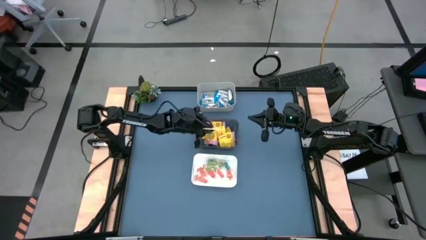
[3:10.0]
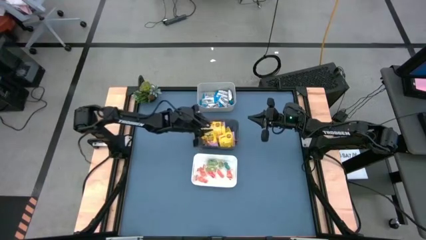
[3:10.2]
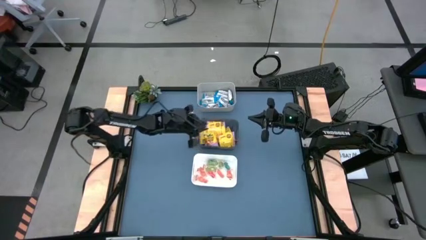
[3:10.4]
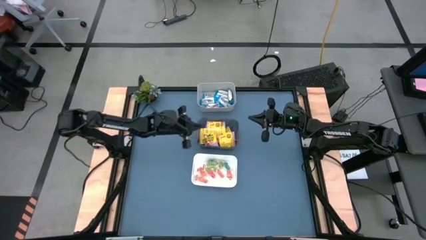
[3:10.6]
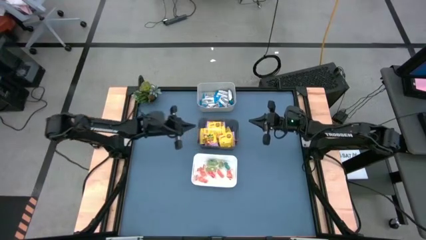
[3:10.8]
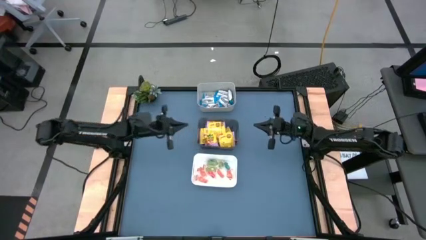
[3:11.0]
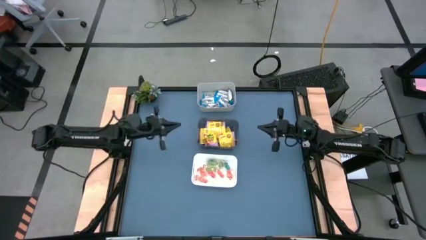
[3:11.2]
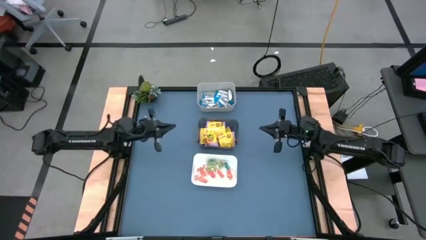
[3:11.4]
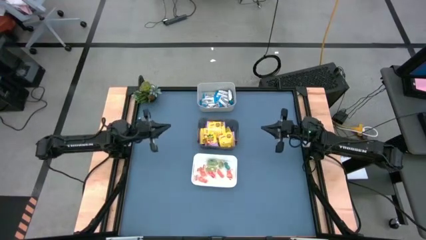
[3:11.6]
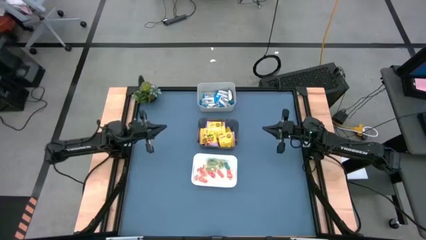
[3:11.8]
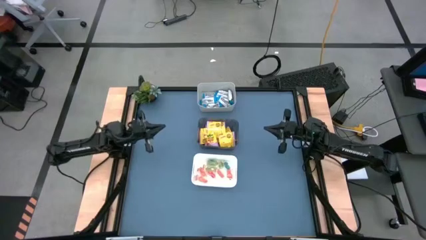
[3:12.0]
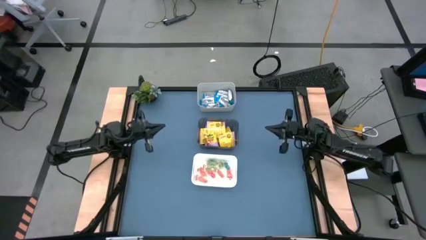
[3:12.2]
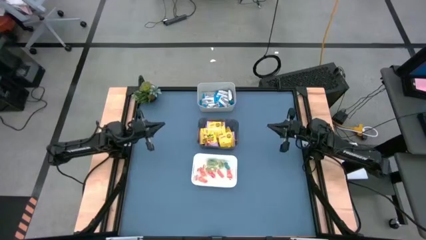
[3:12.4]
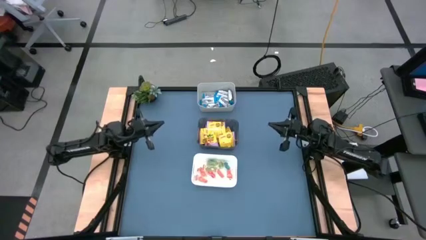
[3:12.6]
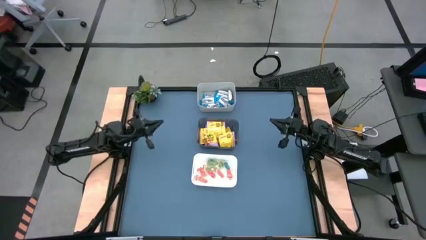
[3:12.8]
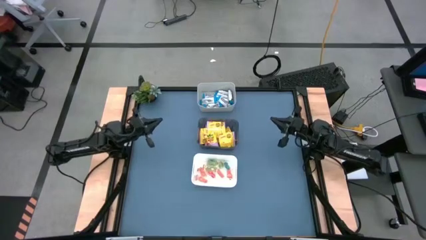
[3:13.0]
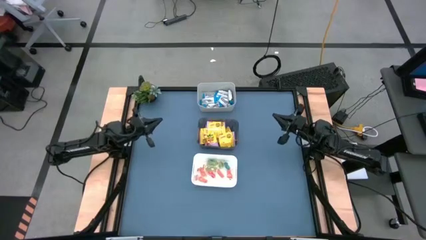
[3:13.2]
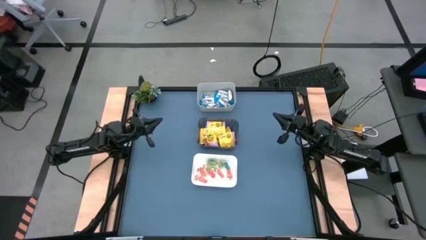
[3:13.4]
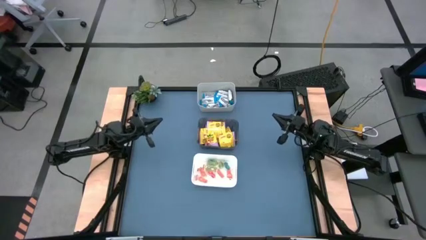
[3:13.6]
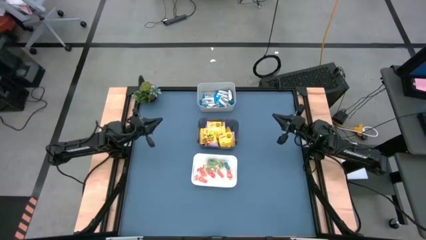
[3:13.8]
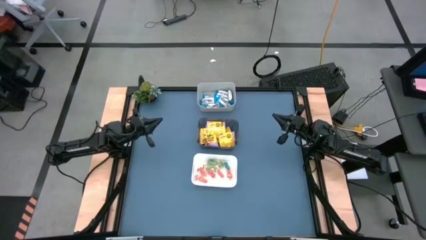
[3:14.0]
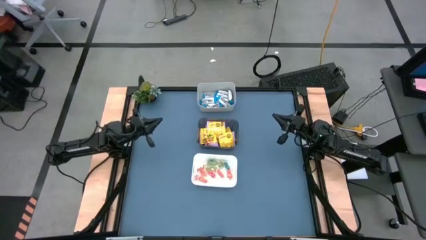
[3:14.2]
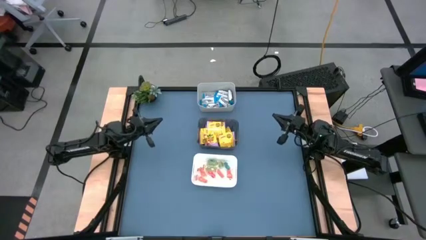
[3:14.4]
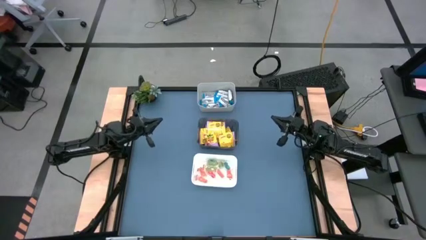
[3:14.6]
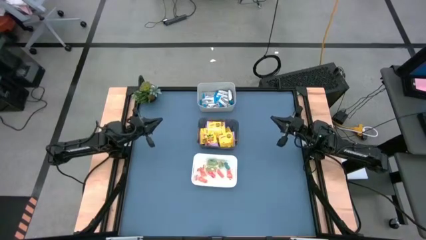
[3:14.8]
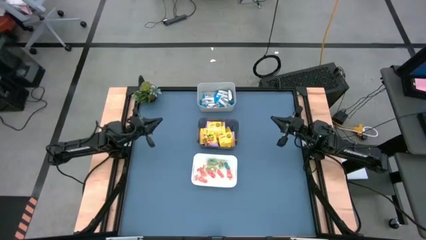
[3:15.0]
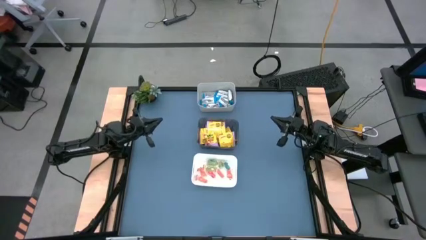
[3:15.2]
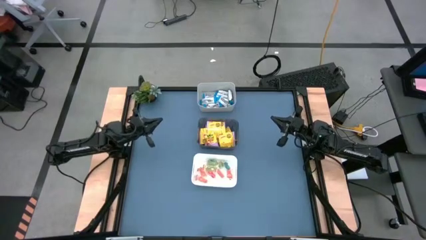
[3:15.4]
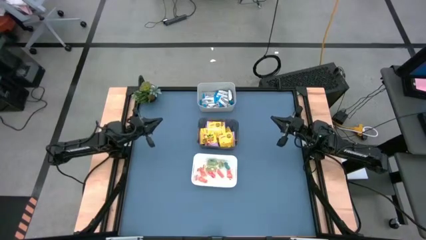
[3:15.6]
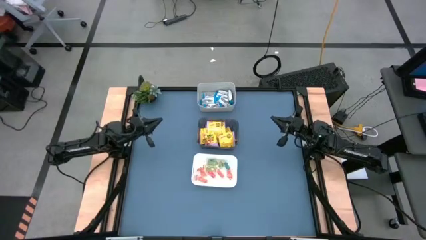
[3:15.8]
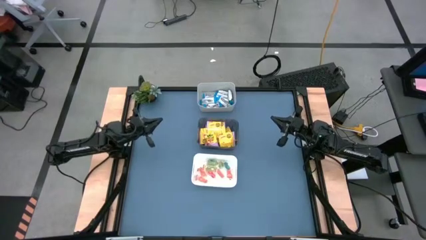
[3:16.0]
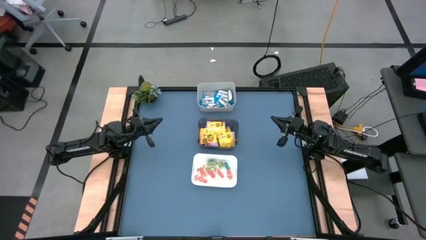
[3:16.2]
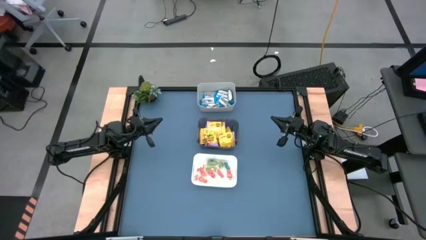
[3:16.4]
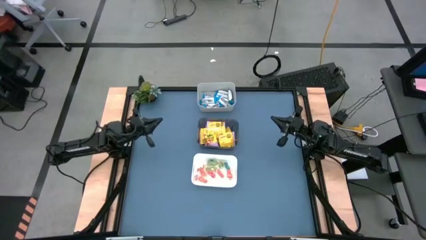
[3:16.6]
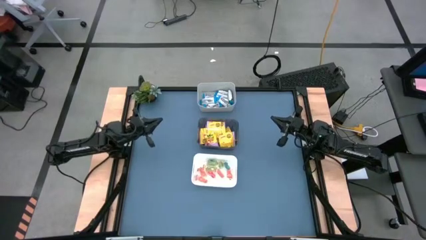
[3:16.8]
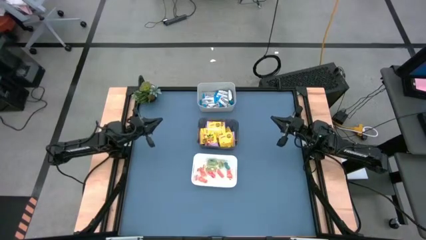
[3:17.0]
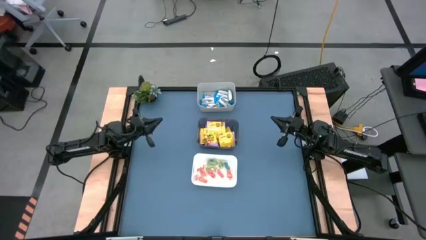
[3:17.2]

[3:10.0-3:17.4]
Task: Sort candy
Return to Home Position

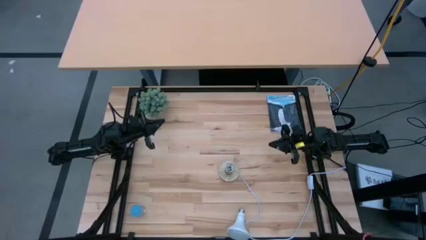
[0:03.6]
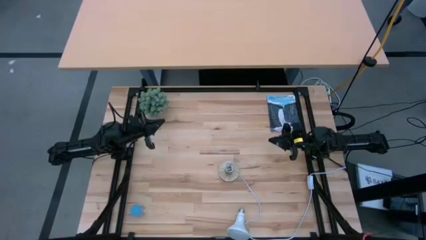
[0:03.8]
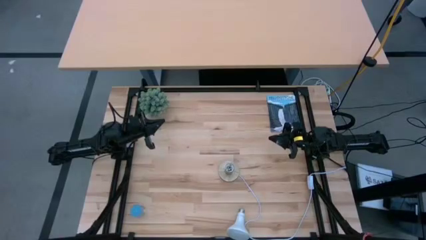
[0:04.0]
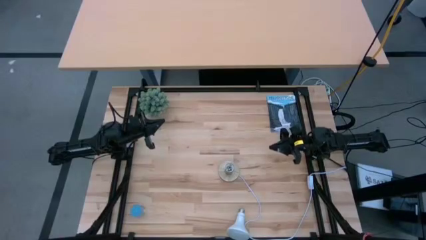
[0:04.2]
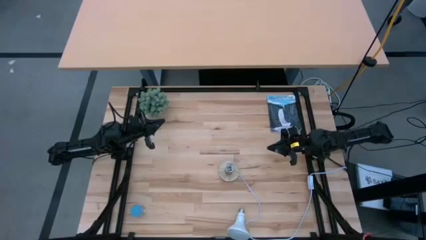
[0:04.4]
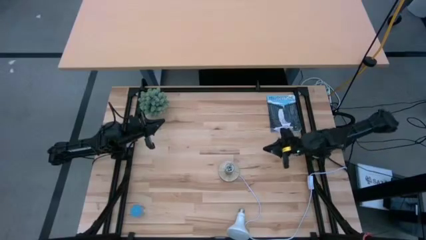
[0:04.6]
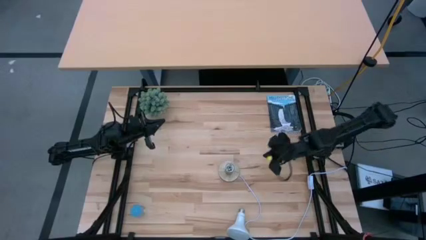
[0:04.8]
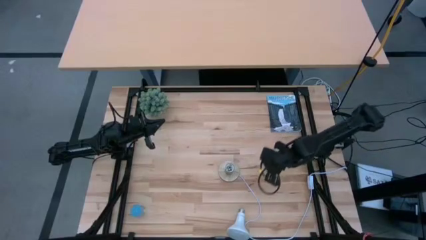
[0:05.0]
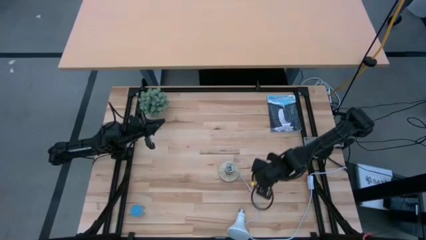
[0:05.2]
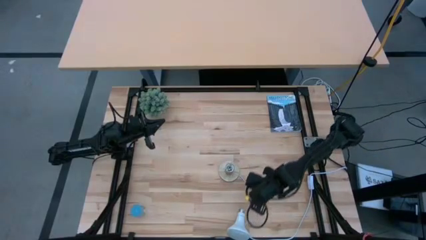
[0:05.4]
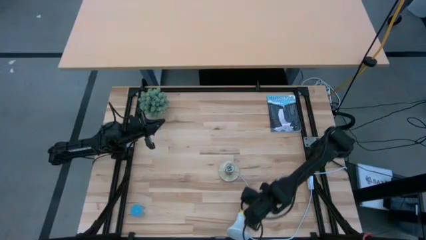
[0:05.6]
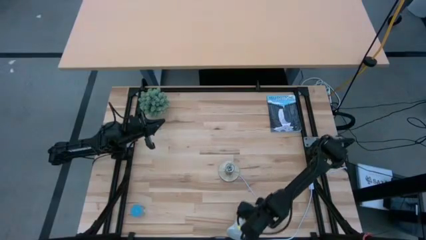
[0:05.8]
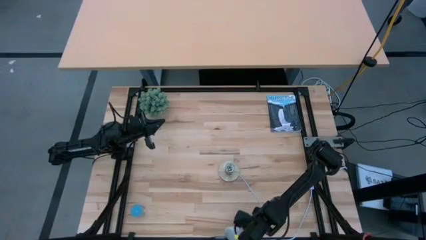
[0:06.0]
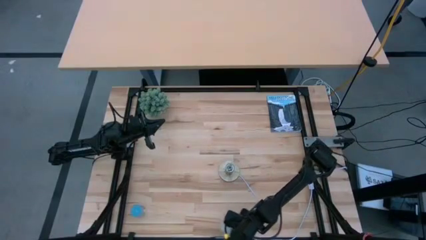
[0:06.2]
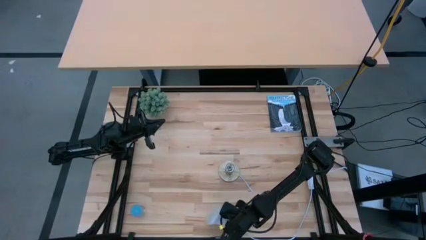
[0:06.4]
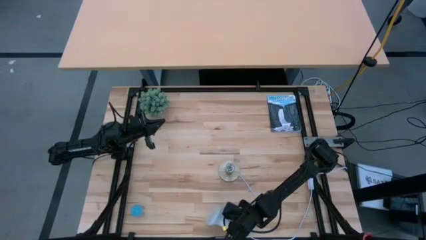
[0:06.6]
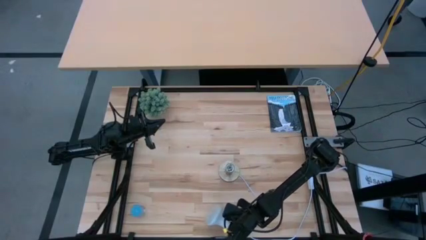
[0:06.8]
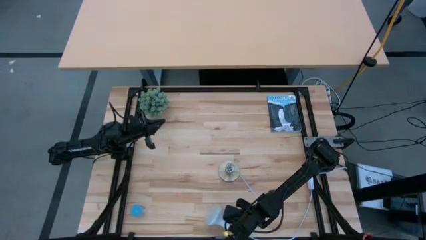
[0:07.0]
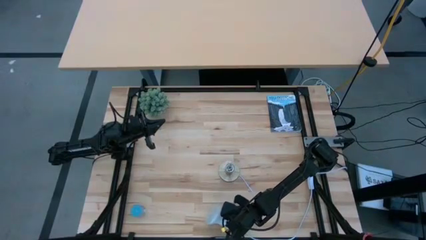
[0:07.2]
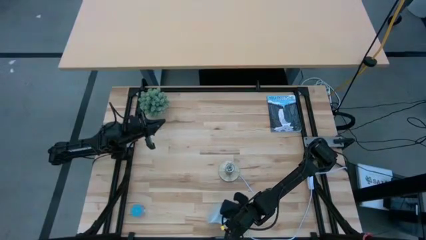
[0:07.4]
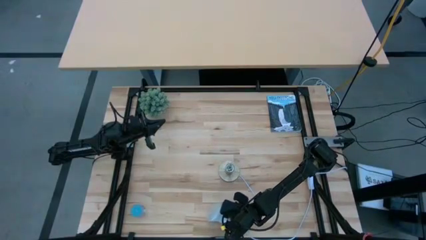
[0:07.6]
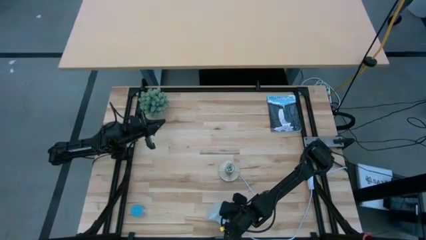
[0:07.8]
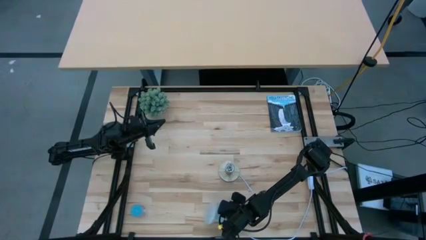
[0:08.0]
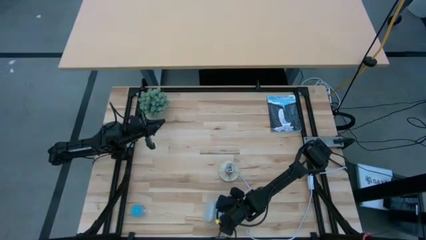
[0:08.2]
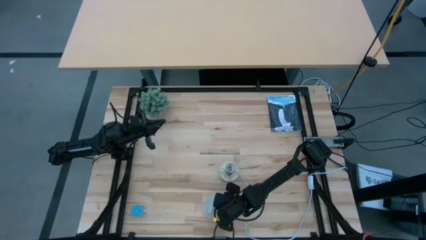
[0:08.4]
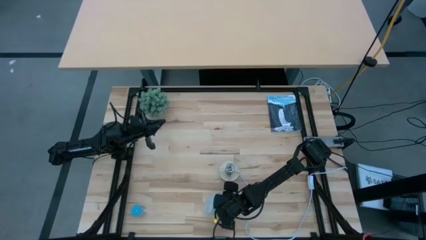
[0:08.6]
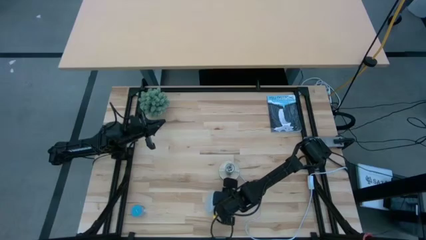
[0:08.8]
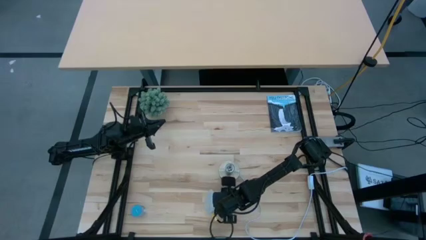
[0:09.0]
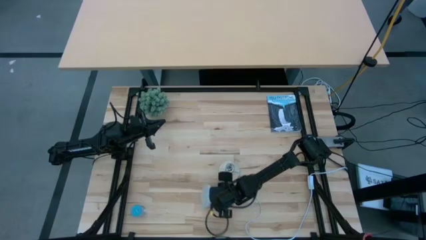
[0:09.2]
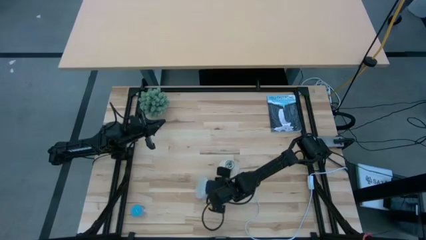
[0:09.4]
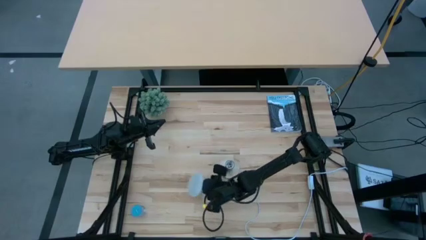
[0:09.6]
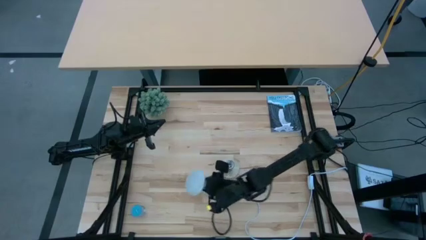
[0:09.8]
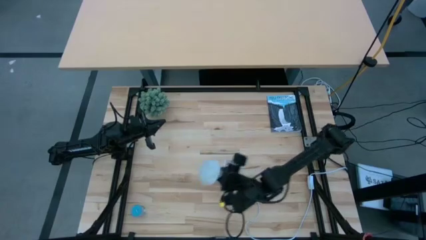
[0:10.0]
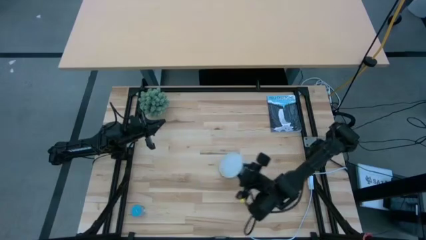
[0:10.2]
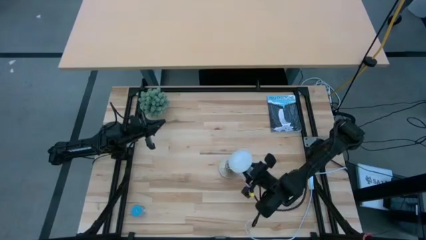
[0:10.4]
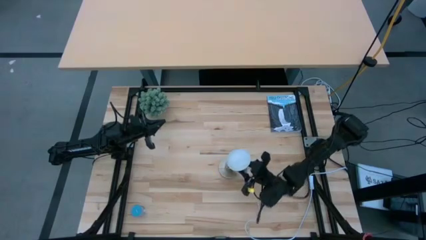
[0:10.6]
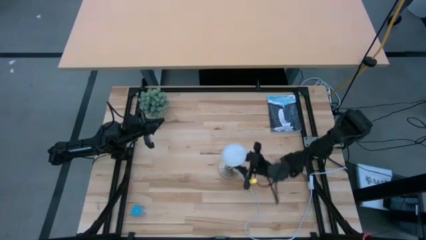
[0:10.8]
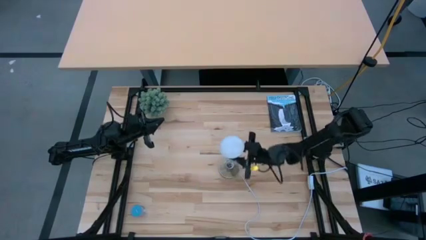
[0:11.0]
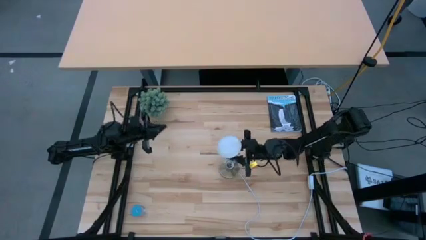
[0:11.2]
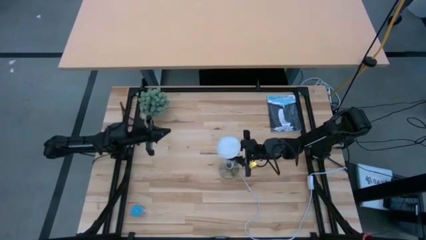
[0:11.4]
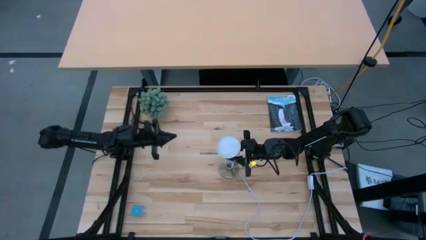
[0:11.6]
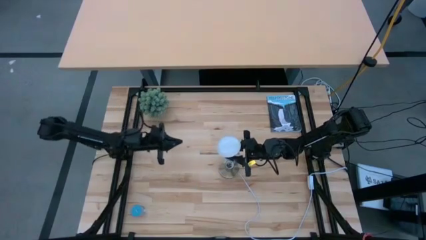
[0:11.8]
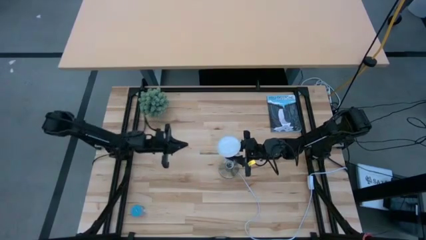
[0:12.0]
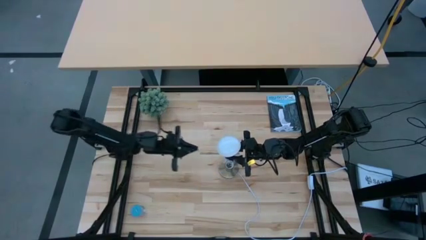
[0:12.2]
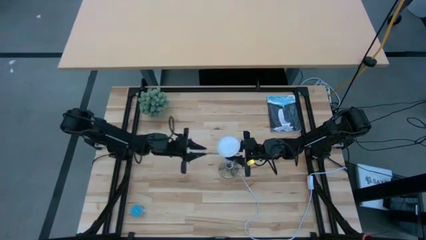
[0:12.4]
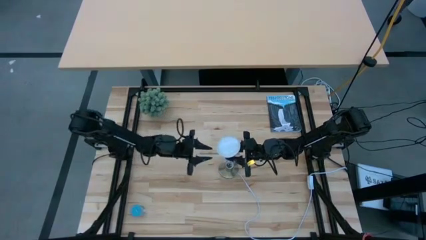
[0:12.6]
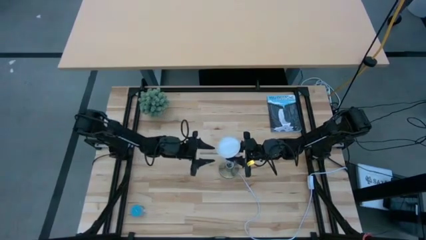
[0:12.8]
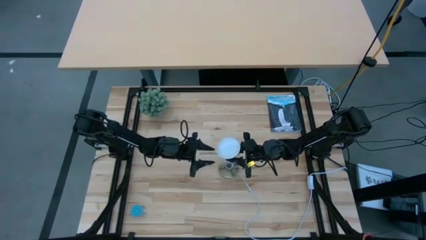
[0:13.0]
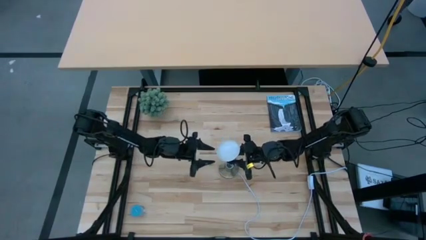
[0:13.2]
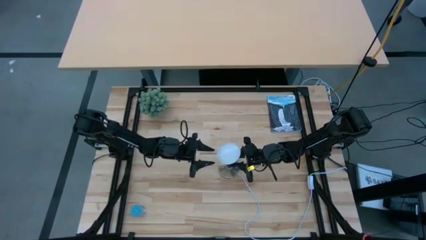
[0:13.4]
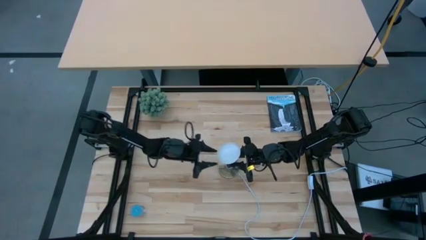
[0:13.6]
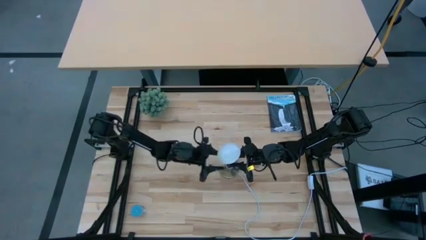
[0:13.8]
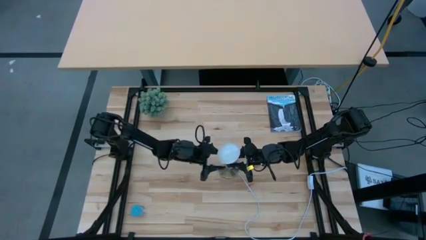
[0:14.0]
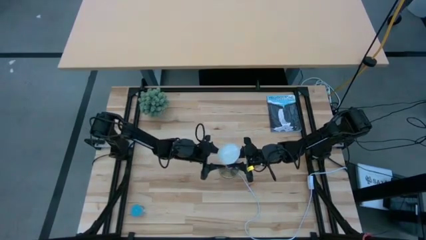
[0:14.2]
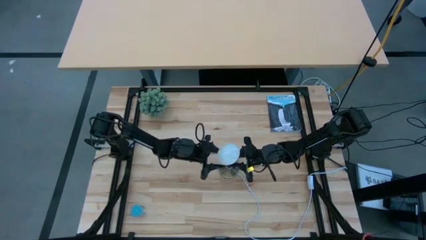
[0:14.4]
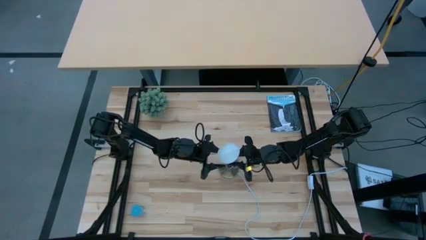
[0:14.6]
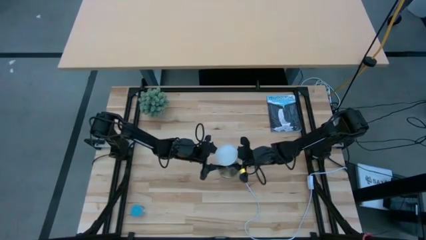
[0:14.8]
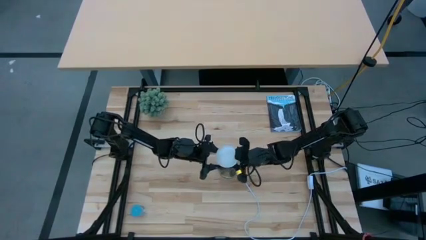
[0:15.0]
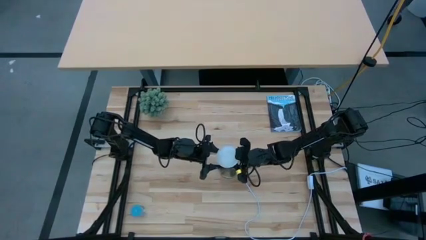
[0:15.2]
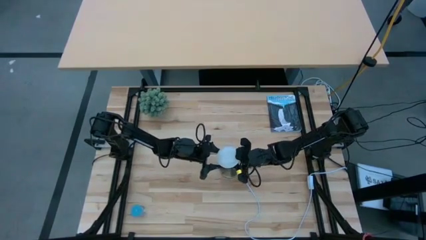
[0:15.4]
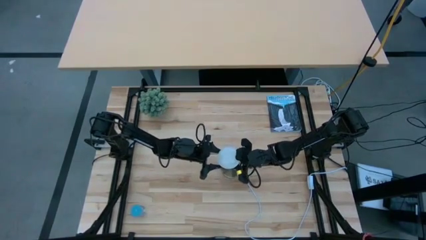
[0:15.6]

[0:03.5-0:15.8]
Task: Screw lightbulb
Insert the lightbulb into the lamp
